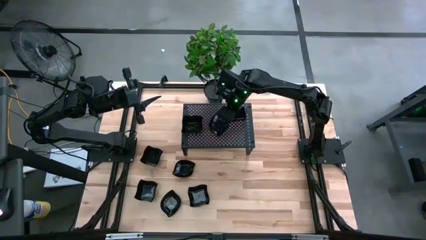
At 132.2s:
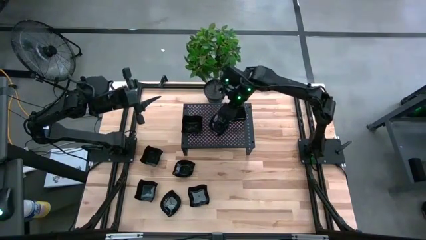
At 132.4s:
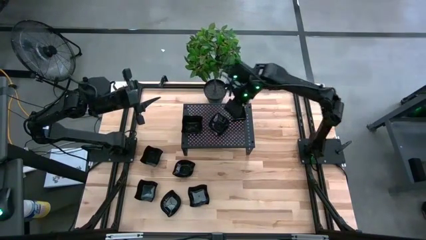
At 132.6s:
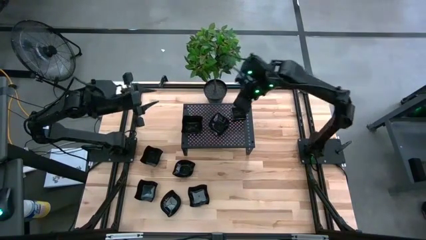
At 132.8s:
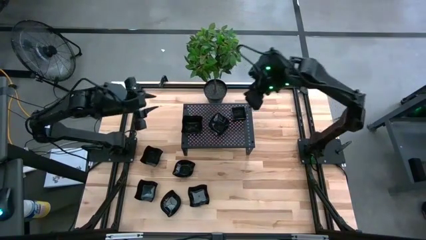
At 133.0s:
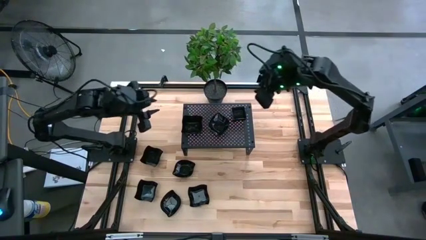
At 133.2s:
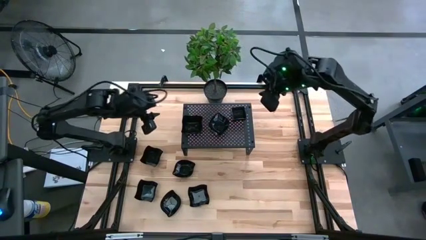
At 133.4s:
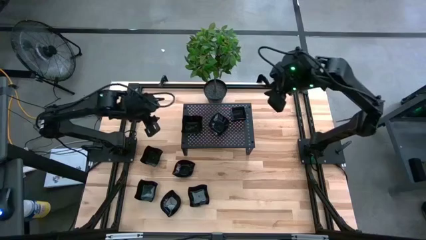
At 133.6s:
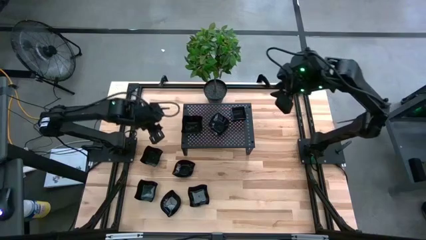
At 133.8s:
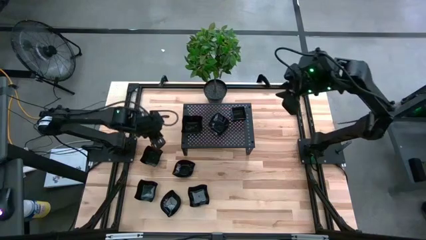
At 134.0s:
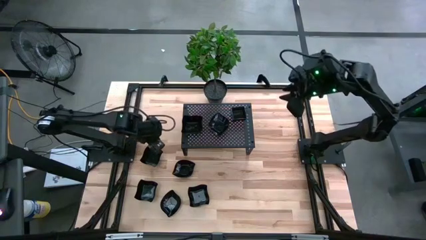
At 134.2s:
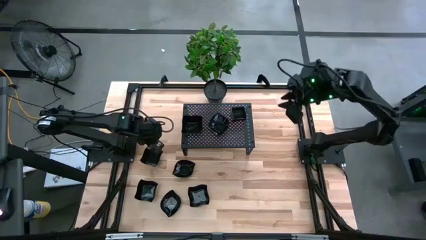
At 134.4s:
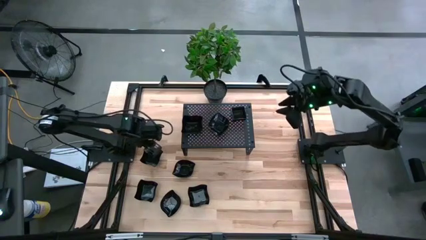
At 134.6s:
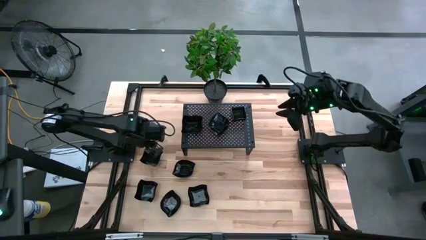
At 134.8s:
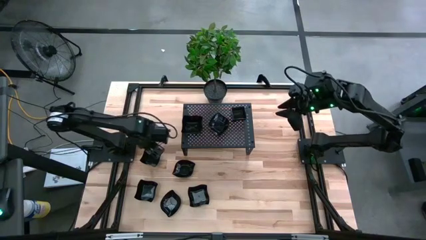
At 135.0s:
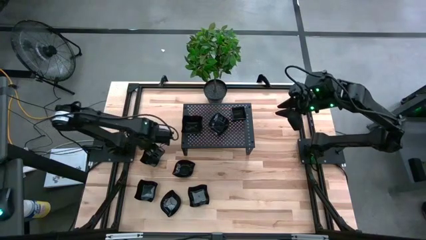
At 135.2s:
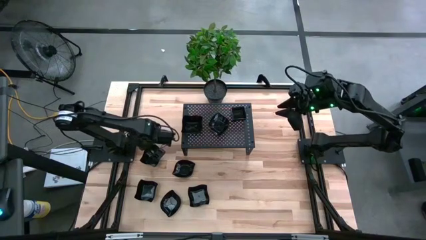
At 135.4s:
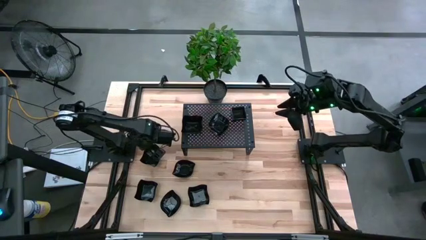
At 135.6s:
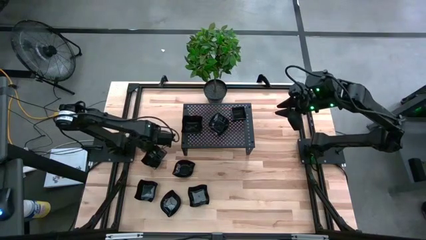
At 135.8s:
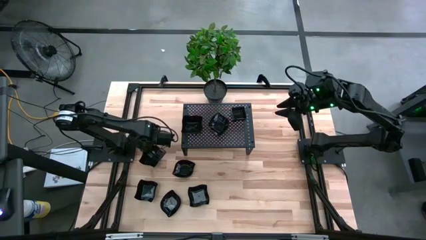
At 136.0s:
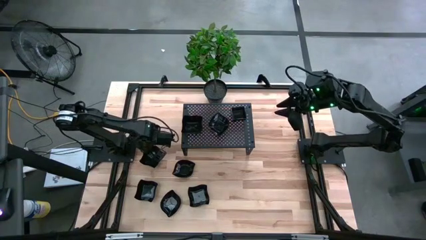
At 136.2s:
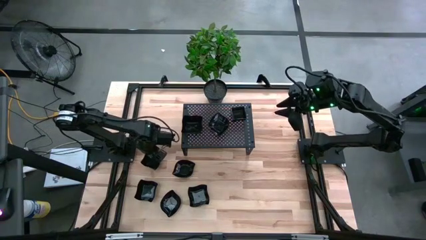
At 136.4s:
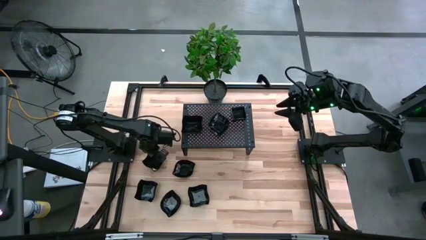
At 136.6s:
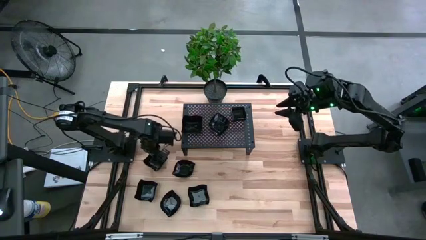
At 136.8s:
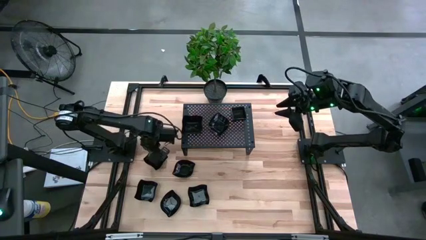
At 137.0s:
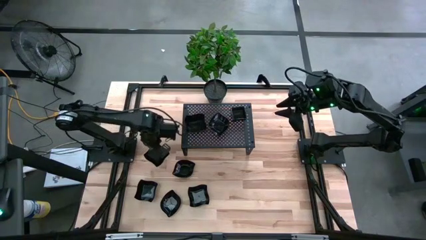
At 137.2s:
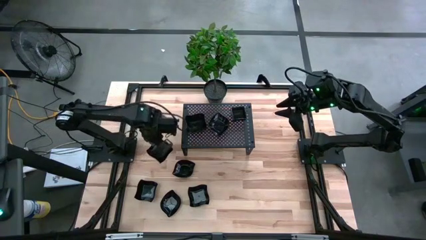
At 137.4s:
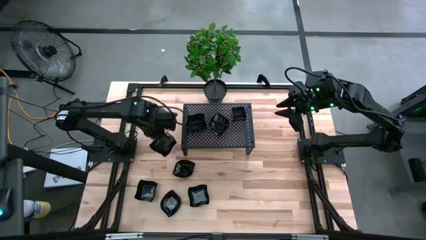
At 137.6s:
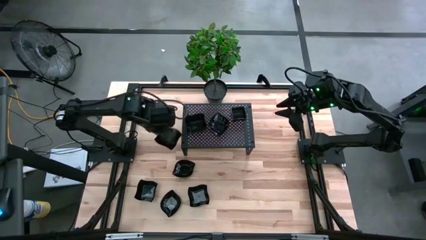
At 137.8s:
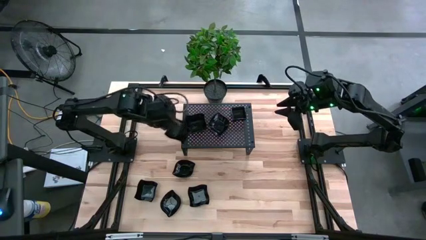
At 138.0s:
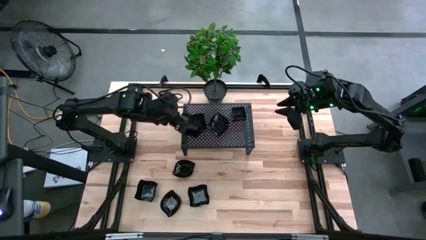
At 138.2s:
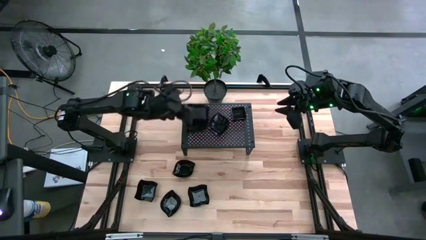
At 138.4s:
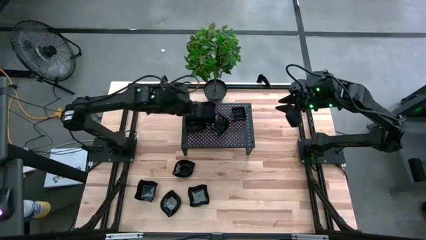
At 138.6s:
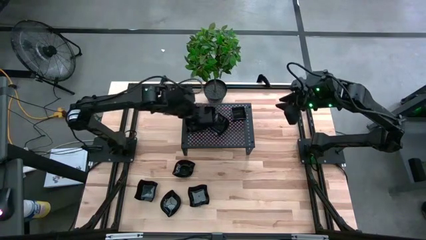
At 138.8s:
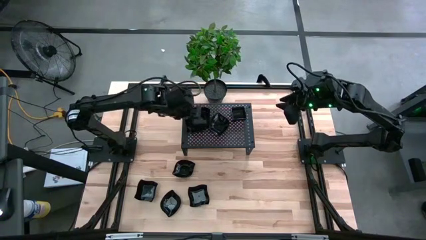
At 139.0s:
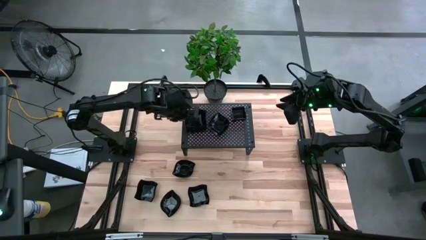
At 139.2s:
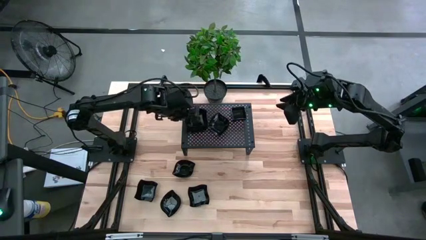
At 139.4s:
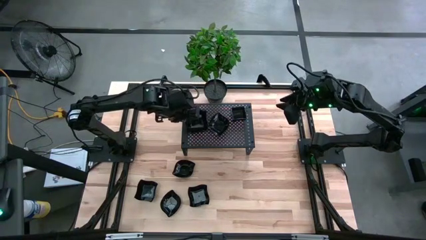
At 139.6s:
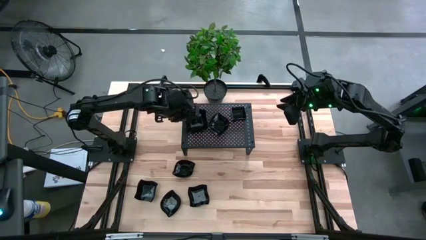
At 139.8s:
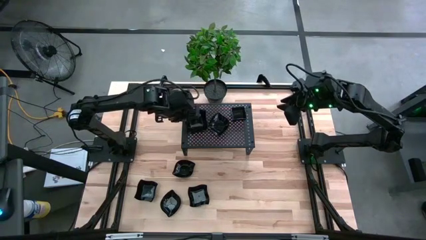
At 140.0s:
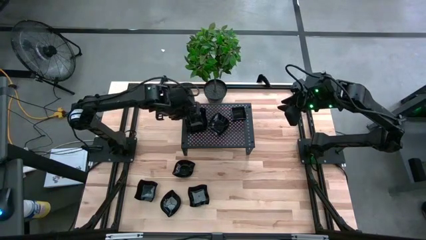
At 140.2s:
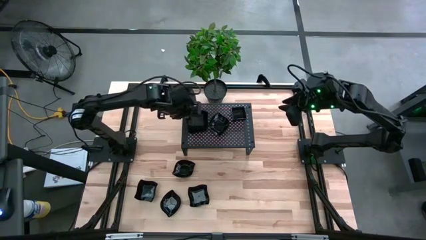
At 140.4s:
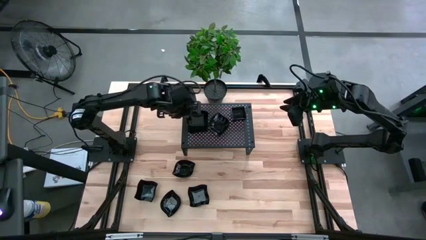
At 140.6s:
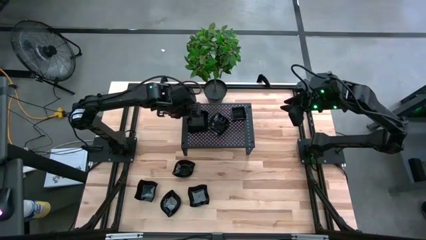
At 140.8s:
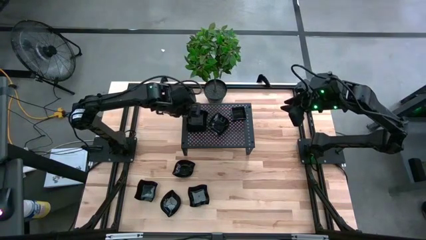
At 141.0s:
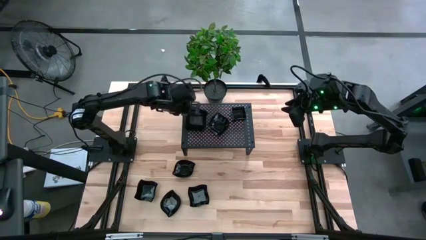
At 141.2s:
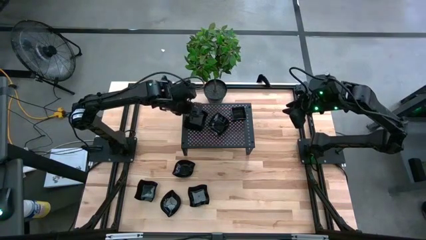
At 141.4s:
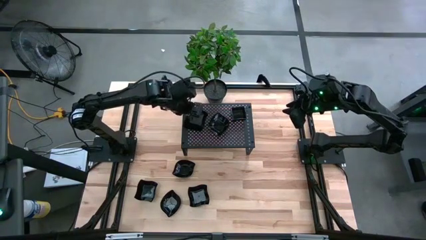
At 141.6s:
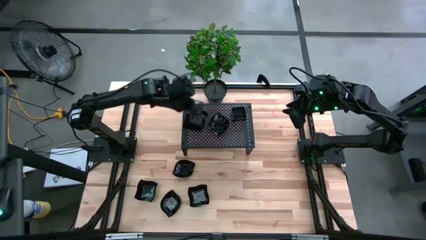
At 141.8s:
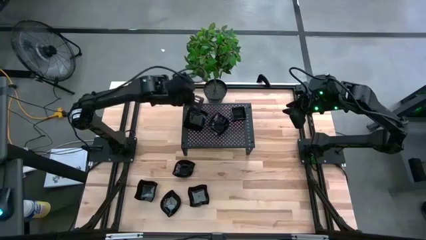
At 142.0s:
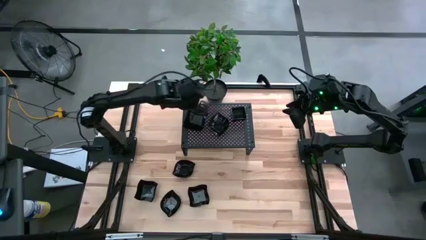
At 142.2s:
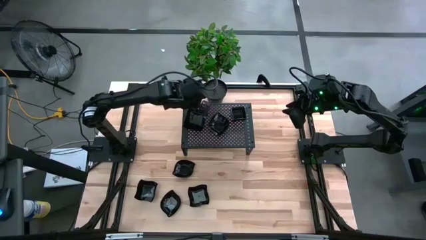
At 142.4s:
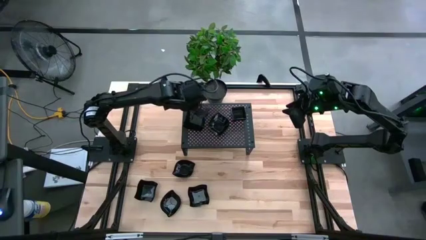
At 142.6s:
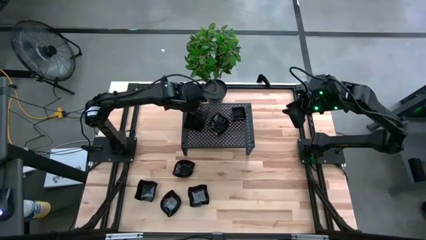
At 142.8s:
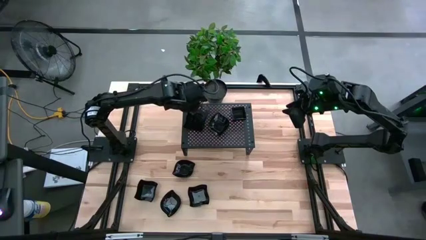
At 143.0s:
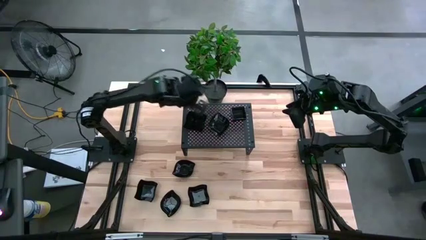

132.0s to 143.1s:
Task: Pick & Place Mini shaped plates
Stack the black distorted square plate on top of the other black distorted square plates on the shelf
